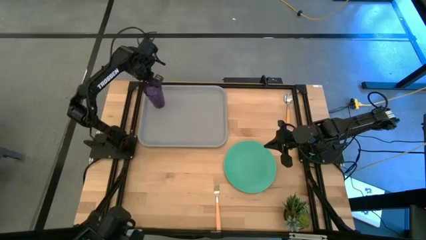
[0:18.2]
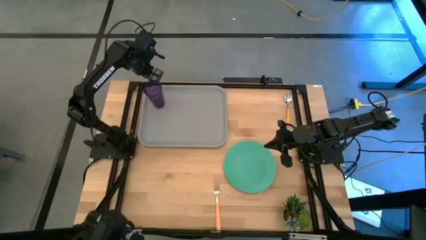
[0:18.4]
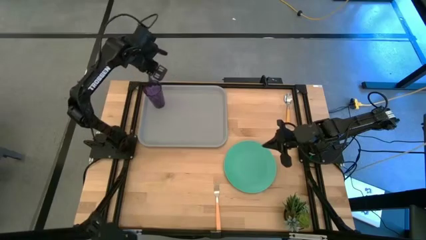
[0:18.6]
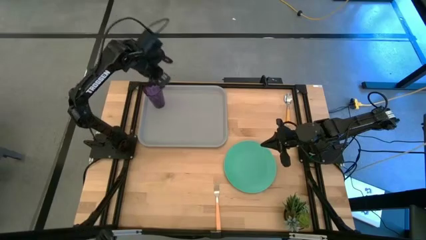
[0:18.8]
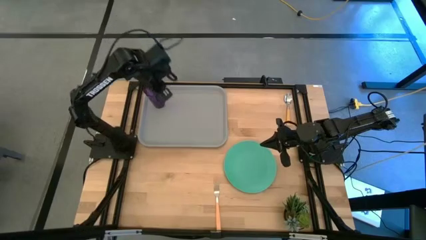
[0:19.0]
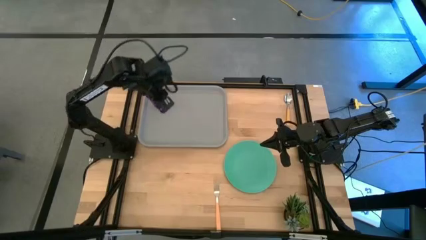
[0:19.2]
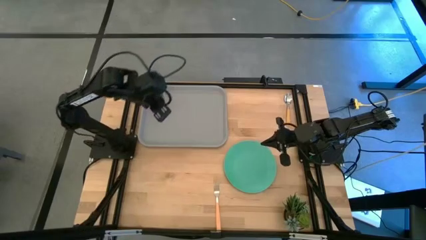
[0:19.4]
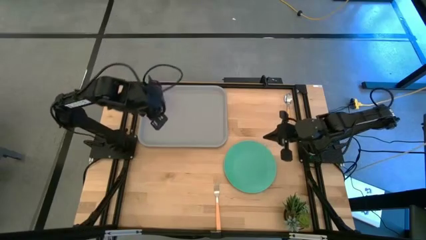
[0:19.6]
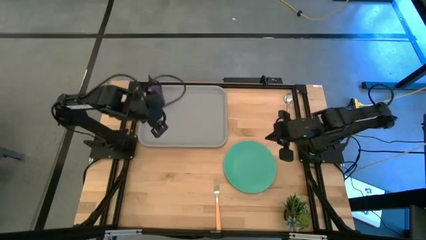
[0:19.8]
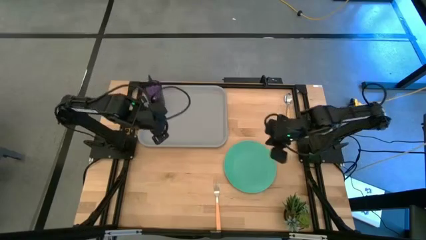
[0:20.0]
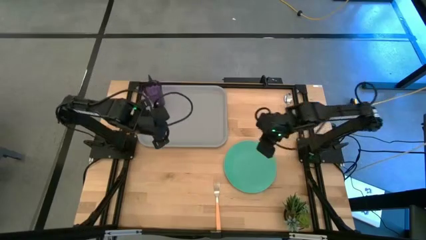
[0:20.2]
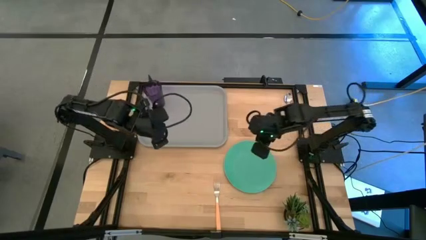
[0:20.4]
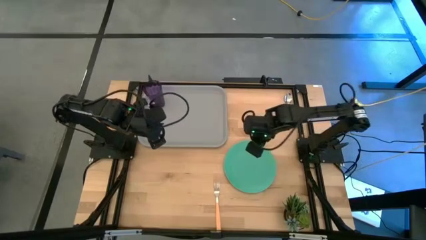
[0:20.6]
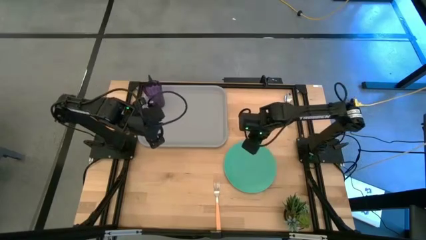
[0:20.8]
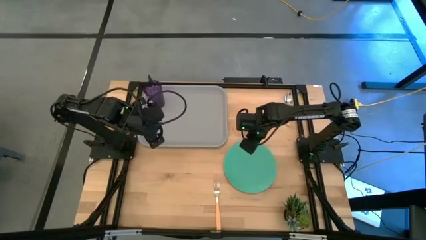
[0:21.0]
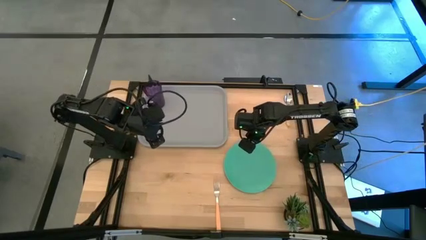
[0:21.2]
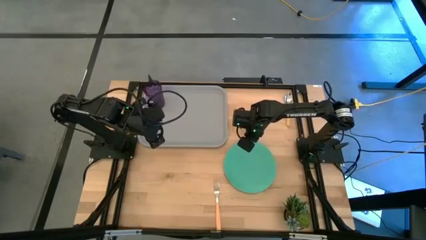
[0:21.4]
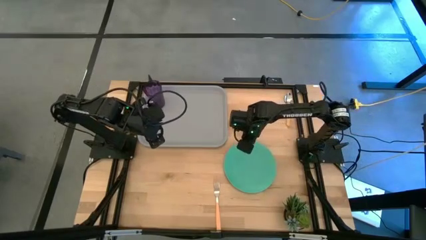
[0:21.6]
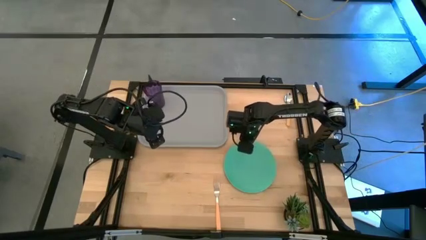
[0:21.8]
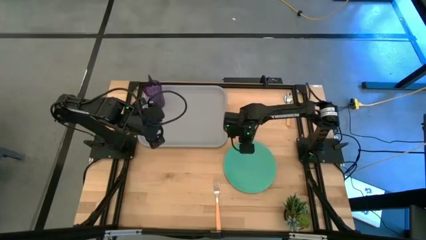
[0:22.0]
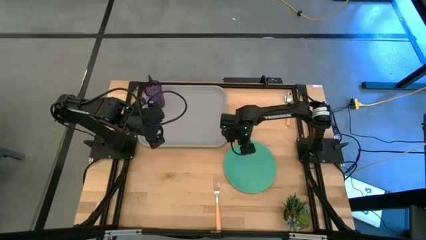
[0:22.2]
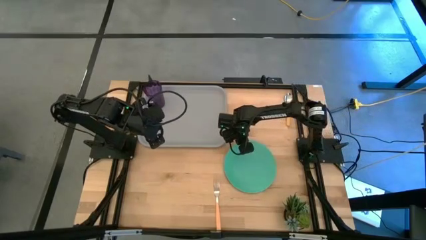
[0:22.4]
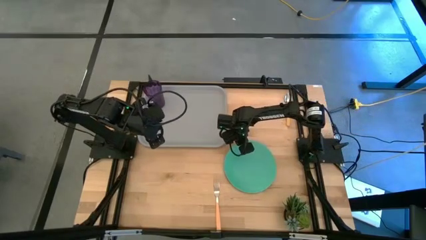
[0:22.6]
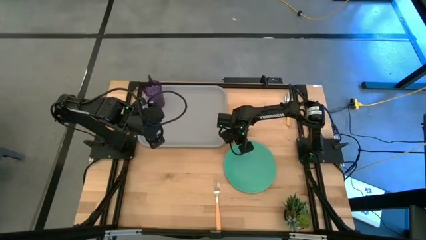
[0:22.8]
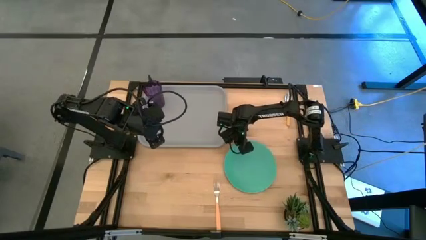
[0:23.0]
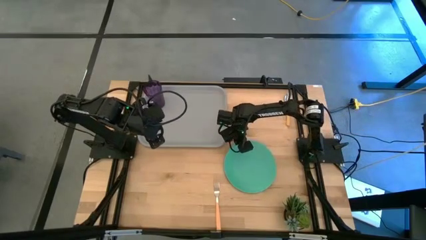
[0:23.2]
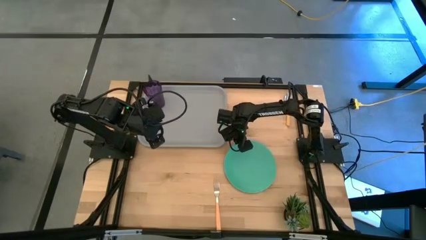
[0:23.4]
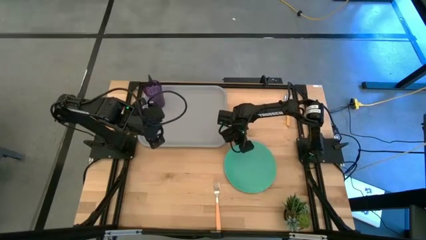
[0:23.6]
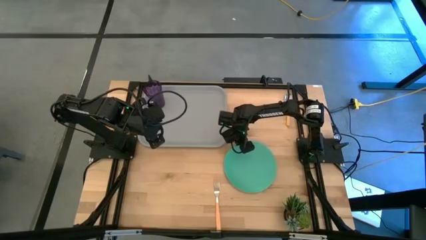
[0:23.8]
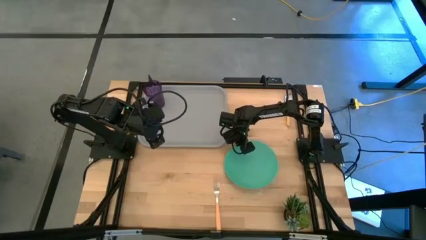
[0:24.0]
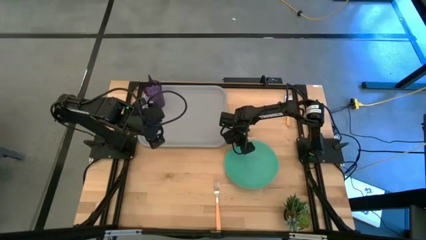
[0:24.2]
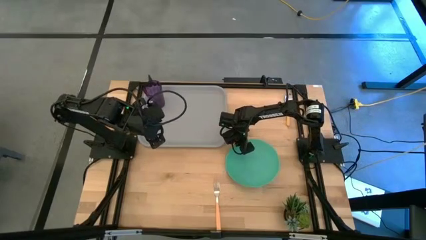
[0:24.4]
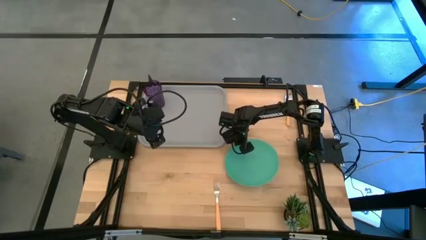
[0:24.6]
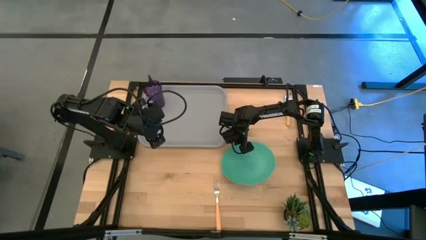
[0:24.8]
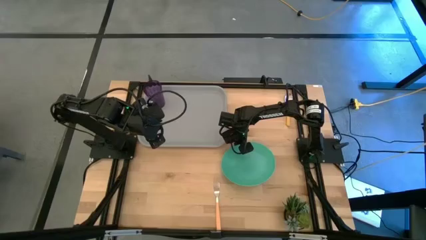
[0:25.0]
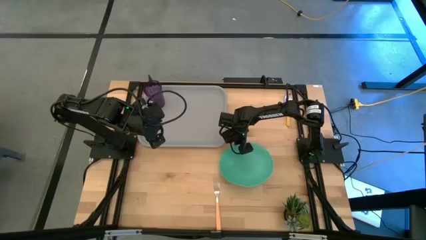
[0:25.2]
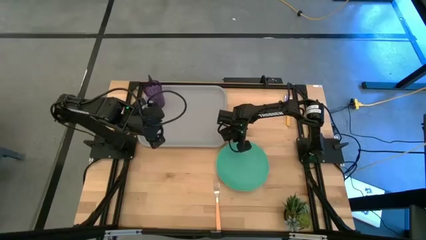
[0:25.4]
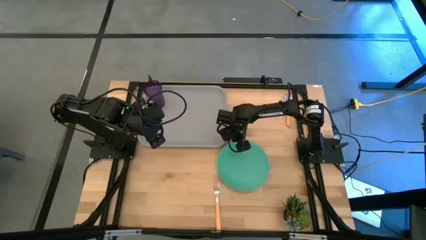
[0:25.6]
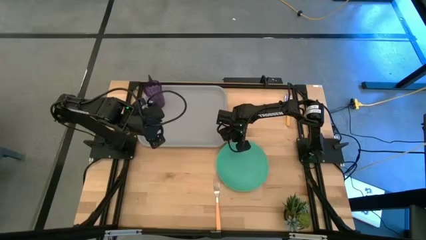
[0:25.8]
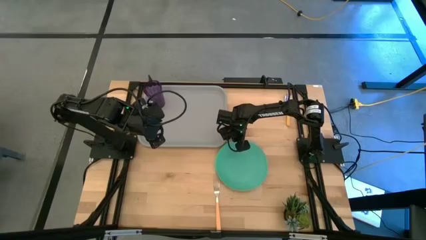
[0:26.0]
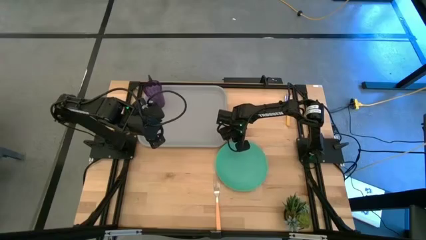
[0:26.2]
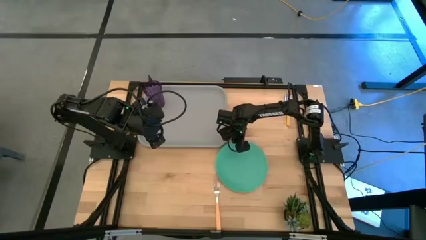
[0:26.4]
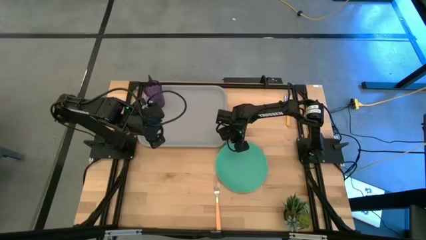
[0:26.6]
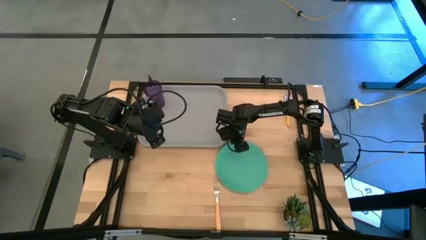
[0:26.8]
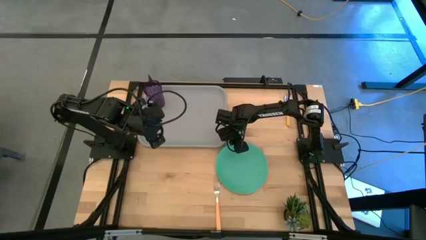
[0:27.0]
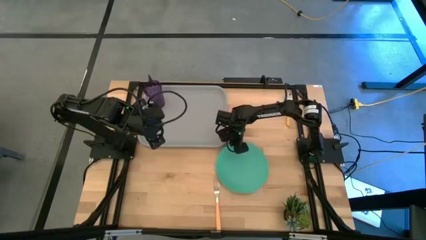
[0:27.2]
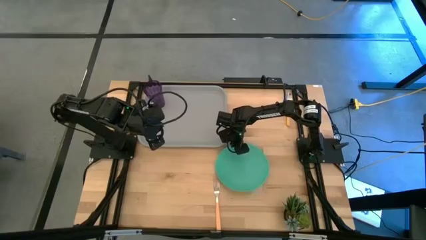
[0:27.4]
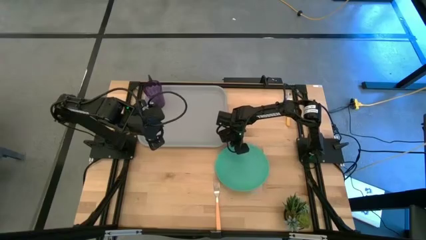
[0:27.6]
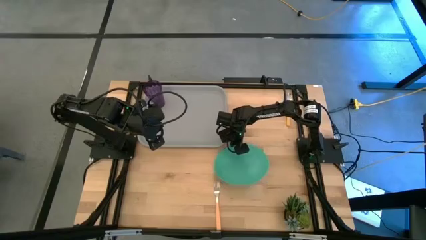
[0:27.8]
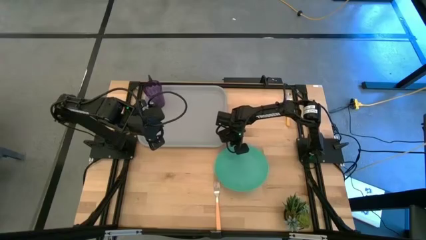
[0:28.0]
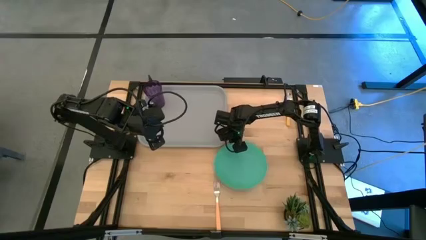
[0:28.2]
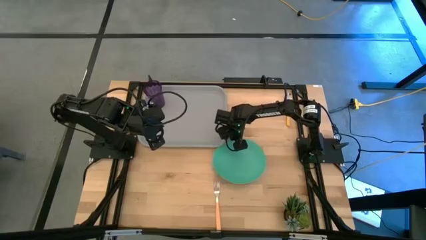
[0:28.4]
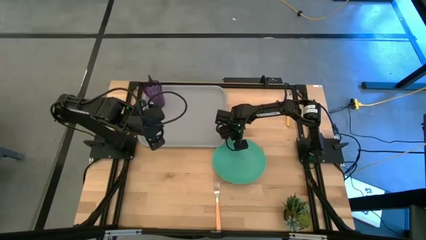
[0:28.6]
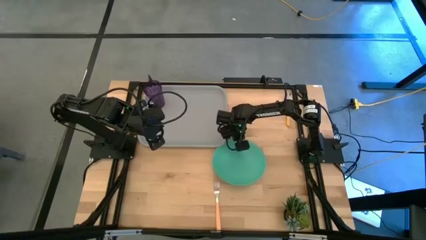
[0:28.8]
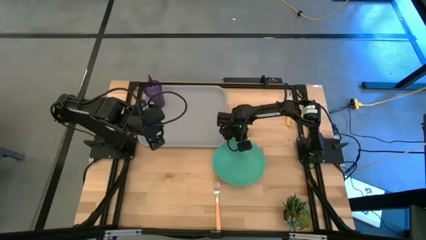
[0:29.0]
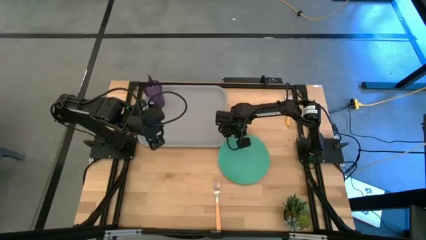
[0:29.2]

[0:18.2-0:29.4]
Task: Pick and place plate/cup/fork/spoon on tray
Put the green plate on the bottom right of the purple cup

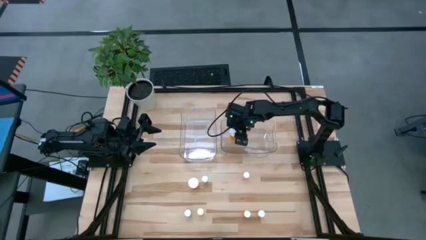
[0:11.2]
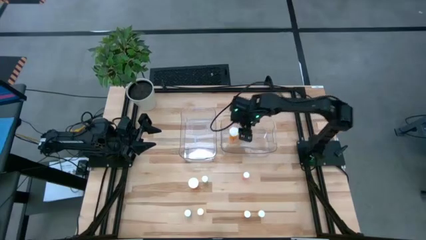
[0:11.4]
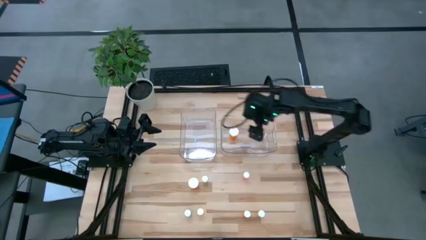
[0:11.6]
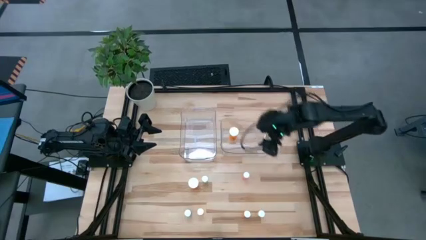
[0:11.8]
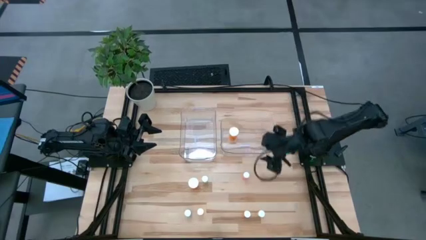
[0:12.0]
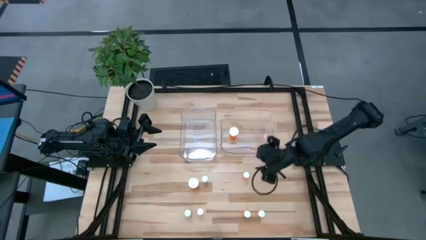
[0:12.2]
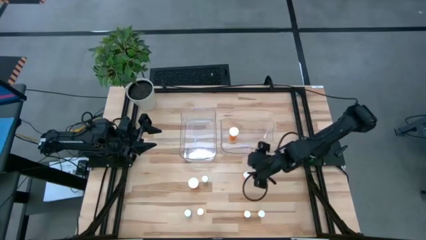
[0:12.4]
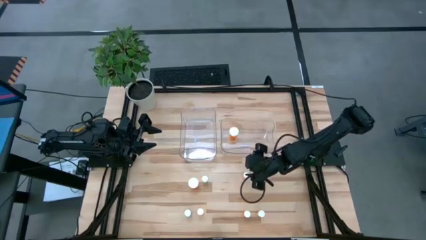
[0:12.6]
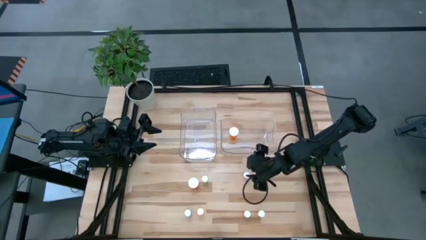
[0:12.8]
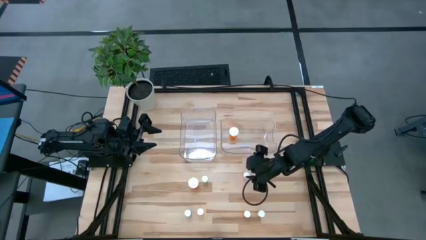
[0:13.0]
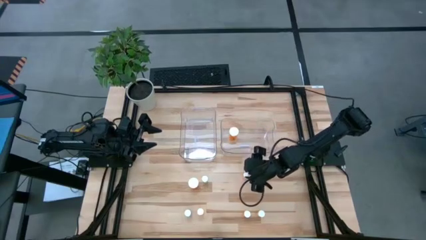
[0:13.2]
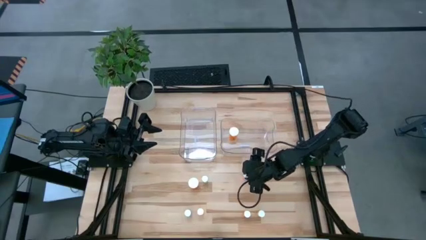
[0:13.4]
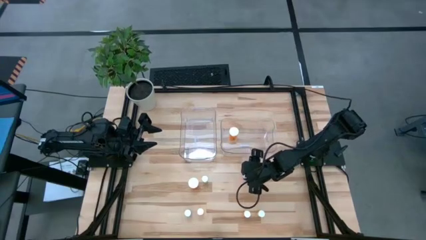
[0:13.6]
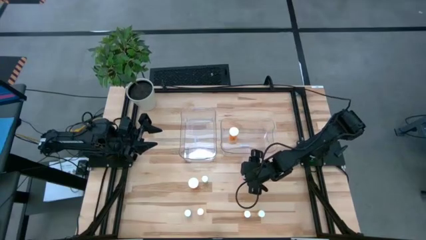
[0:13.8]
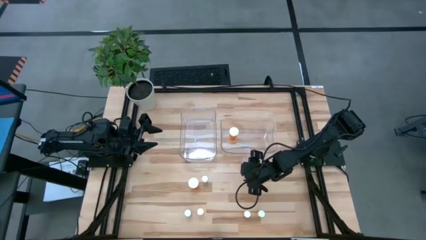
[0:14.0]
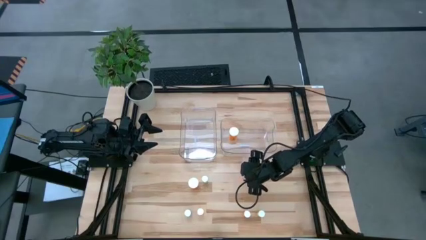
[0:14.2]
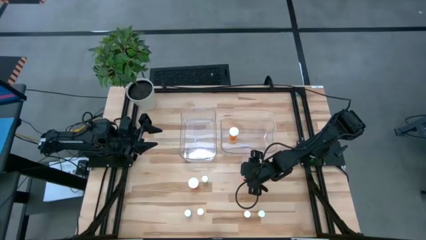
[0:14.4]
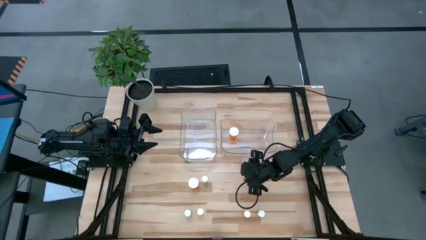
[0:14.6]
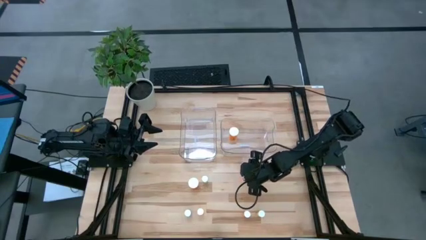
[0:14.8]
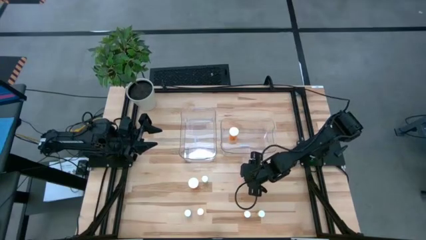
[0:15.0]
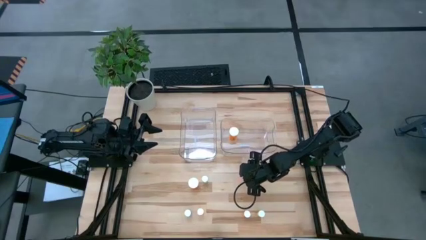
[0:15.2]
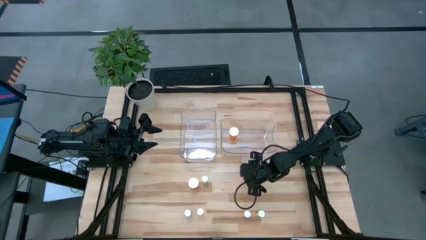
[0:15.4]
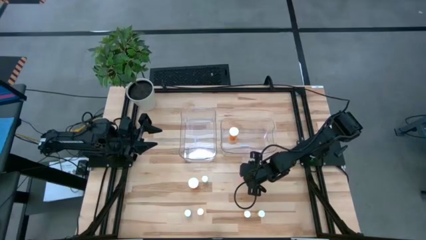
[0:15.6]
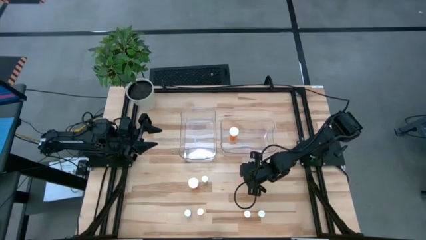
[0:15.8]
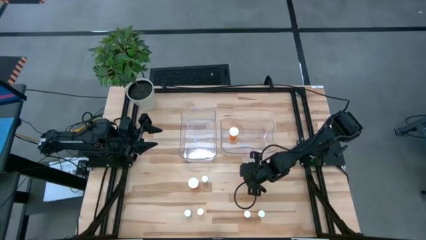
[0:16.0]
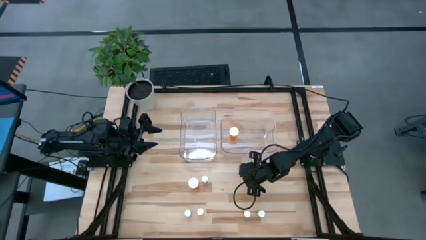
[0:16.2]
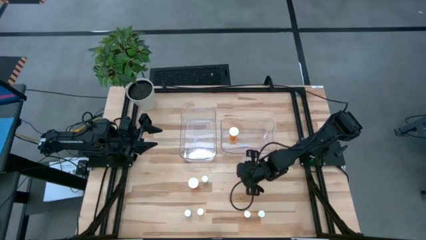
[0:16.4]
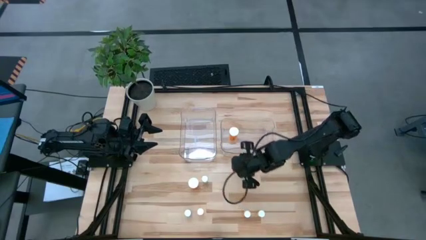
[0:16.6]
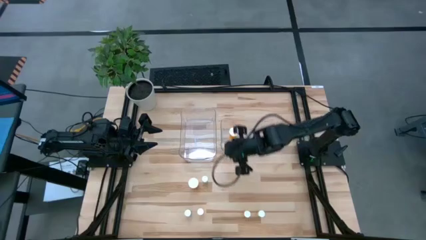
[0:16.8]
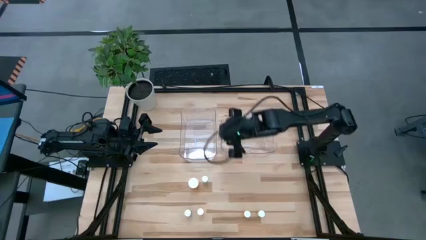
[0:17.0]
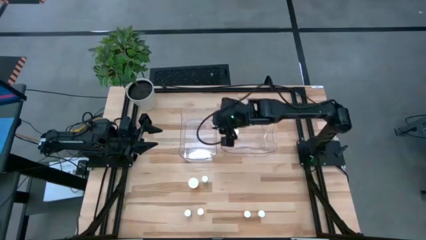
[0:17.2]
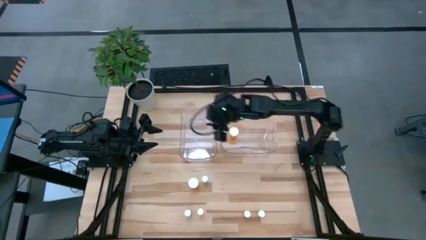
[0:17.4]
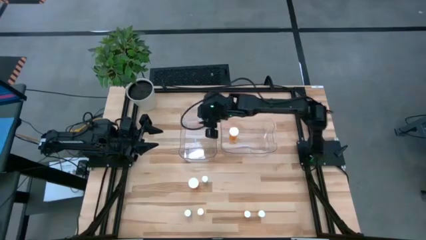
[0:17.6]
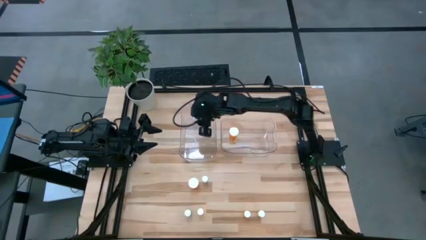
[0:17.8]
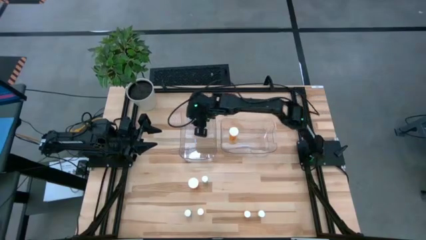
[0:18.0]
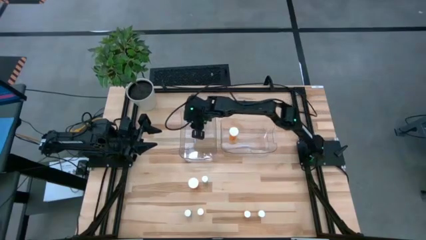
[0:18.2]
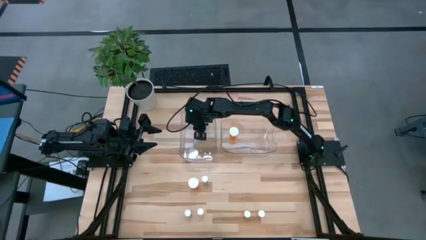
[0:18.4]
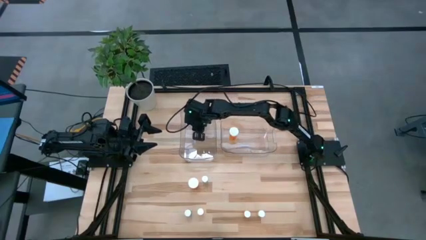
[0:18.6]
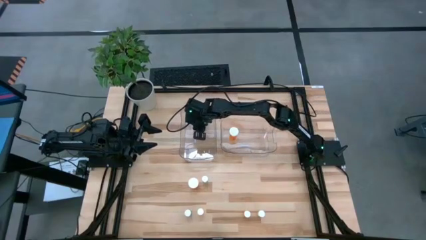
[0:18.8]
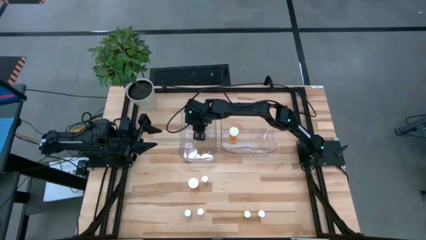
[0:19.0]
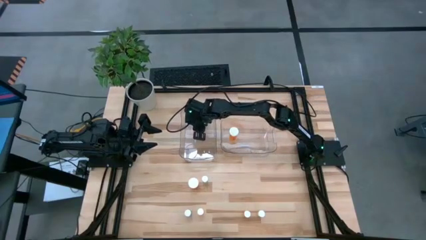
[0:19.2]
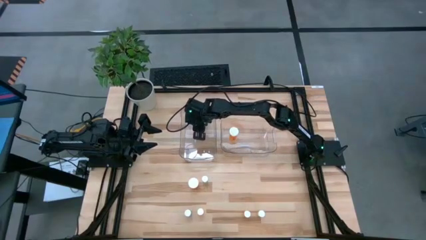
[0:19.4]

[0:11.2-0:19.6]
Task: Pick and place medicine bottles into bin by pill shape (circle, oval)
Put the red pill bottle into the left transparent bin
